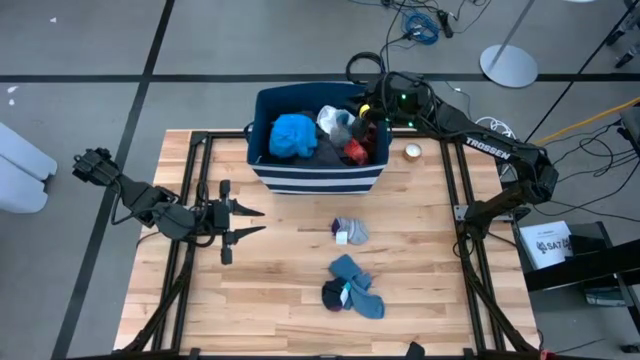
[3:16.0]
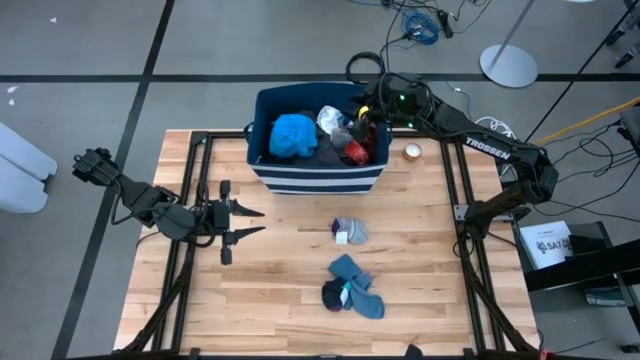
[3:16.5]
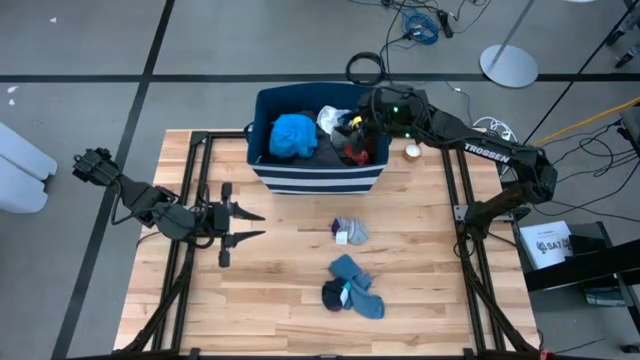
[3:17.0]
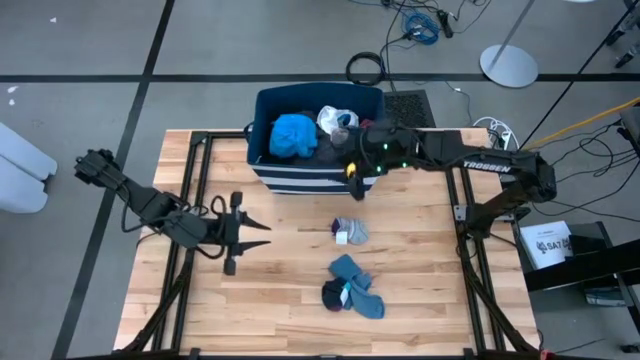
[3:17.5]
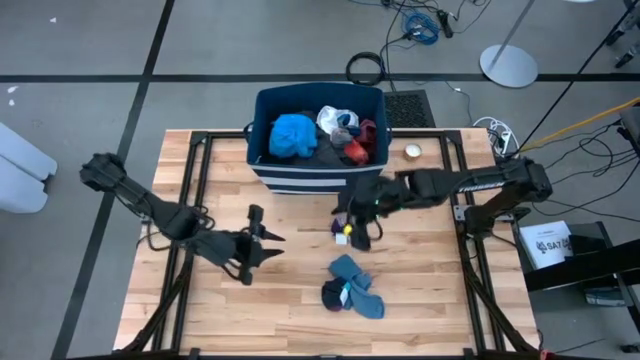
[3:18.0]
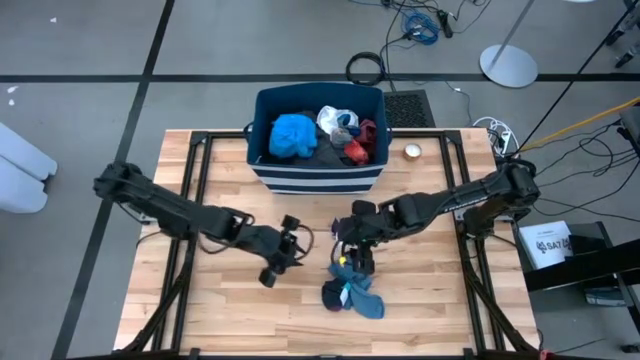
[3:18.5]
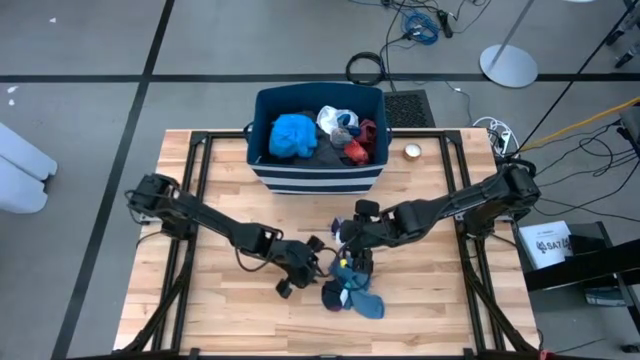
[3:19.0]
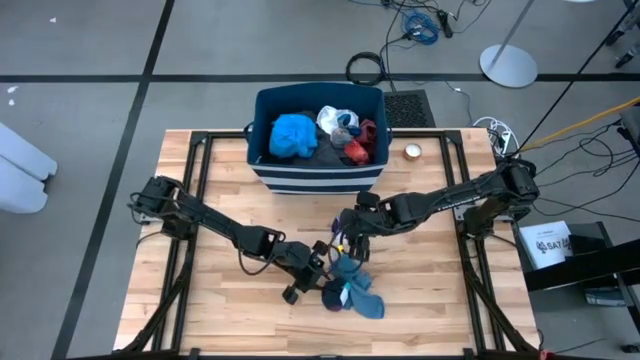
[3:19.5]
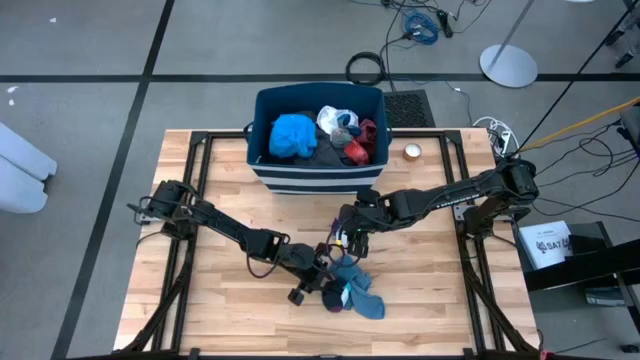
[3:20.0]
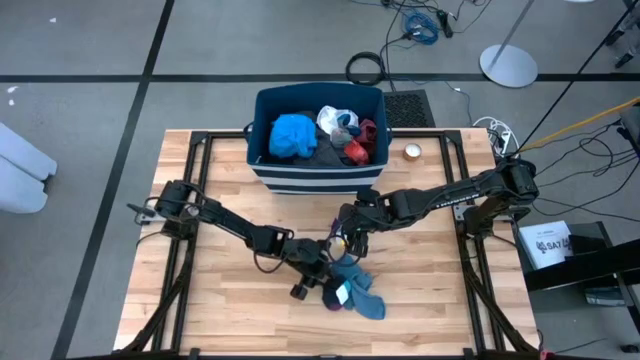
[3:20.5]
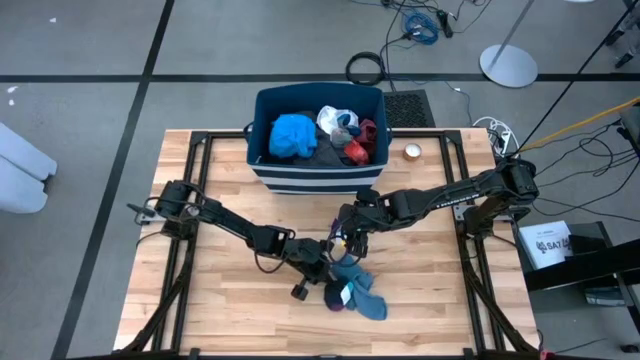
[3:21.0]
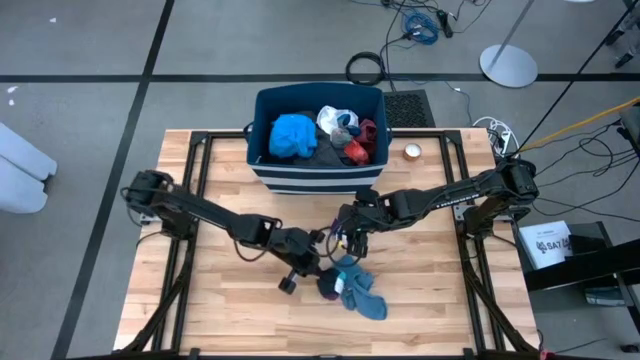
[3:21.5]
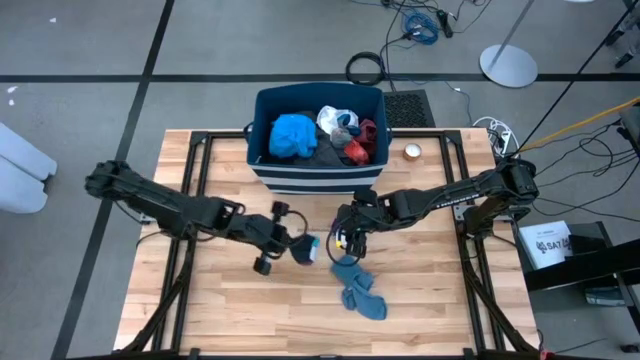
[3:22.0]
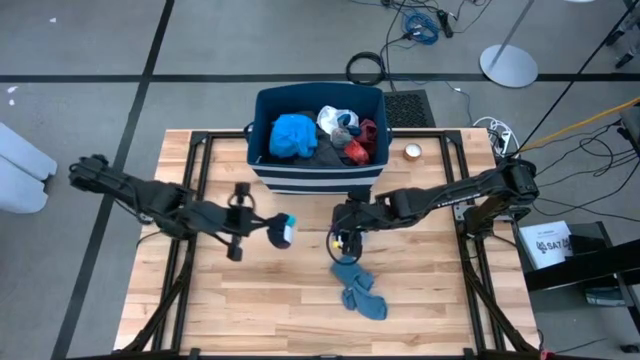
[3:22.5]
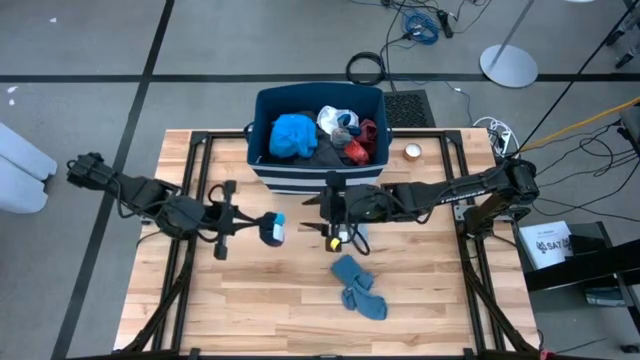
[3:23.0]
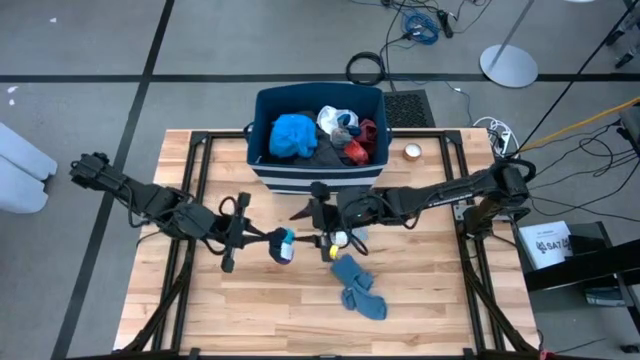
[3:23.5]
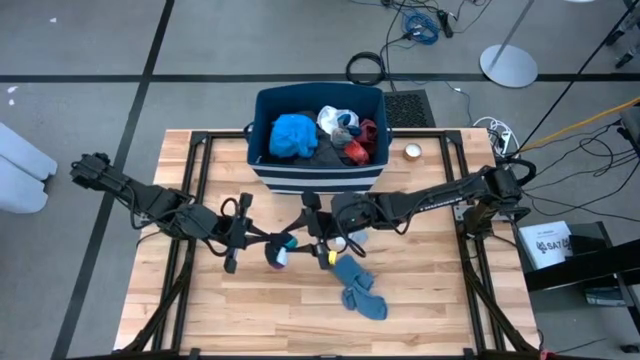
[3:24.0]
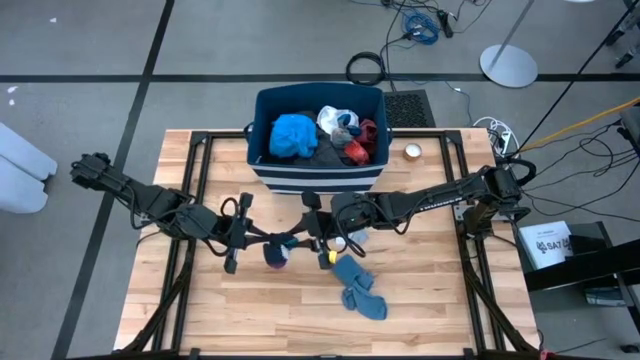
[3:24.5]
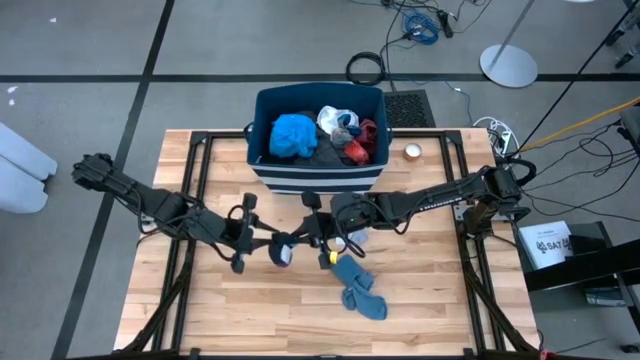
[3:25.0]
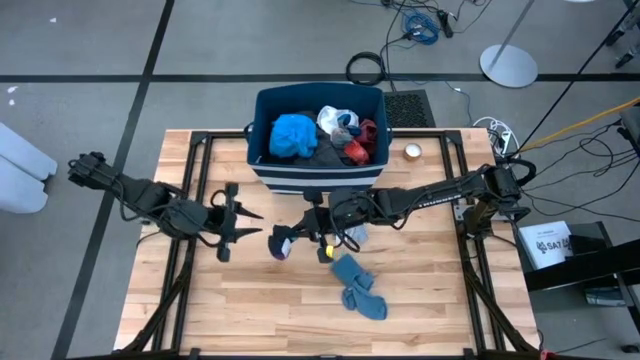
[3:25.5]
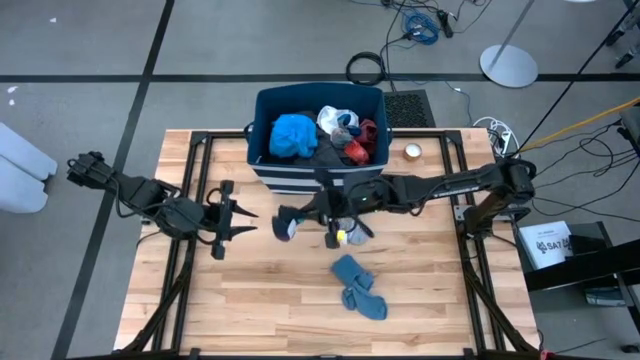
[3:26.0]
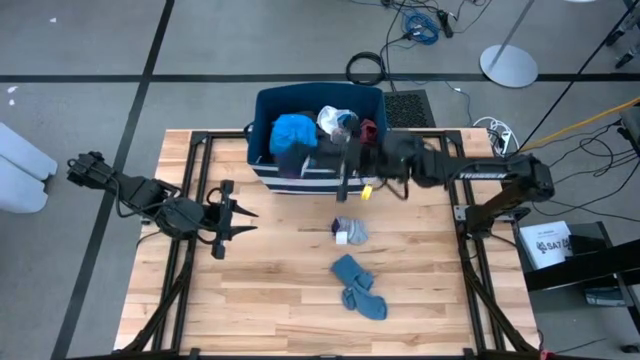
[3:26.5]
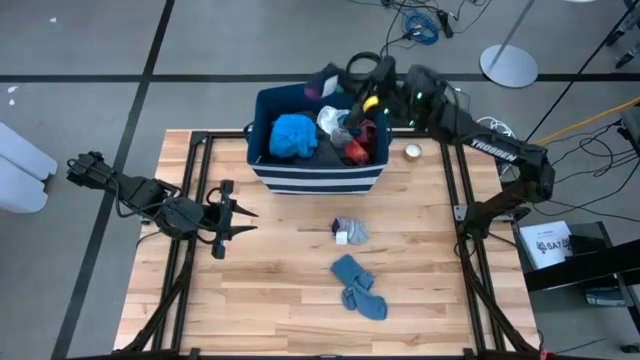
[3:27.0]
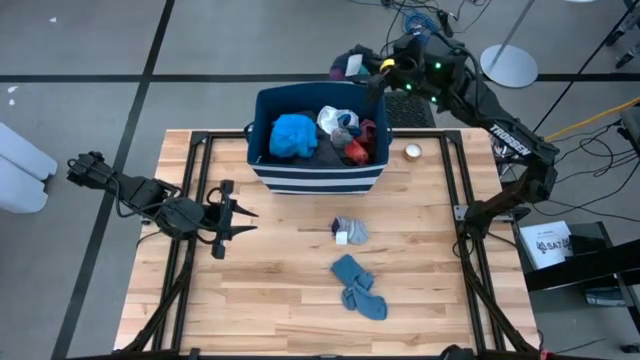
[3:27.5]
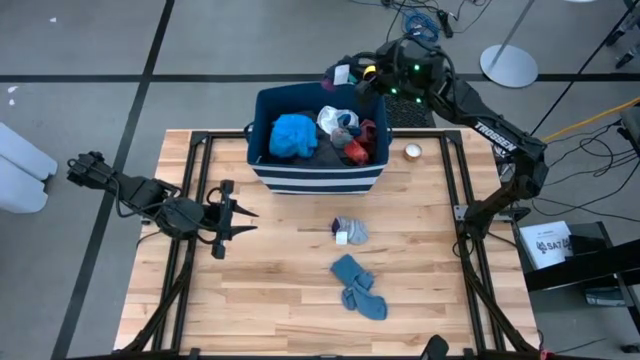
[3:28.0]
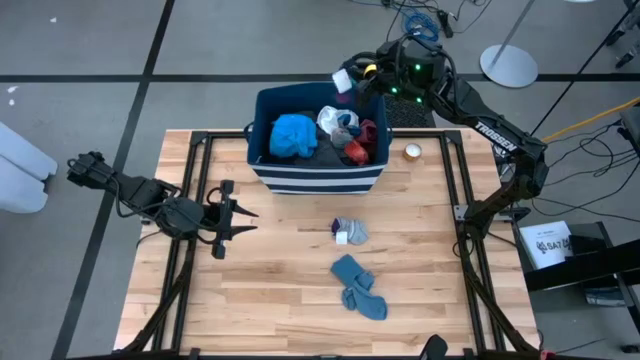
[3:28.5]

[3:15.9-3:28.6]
Task: Sort clothes
Put the black sock into the blue laundry bin

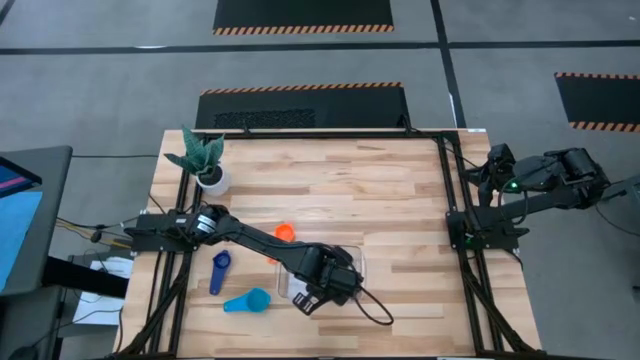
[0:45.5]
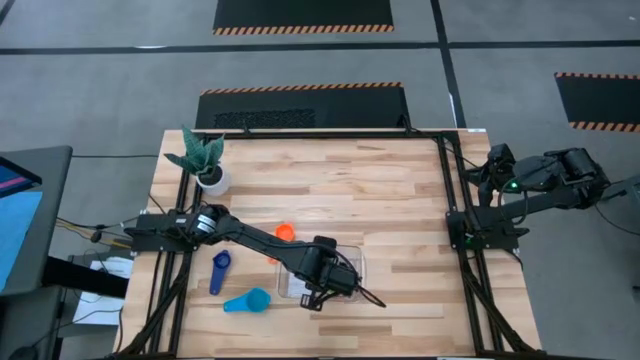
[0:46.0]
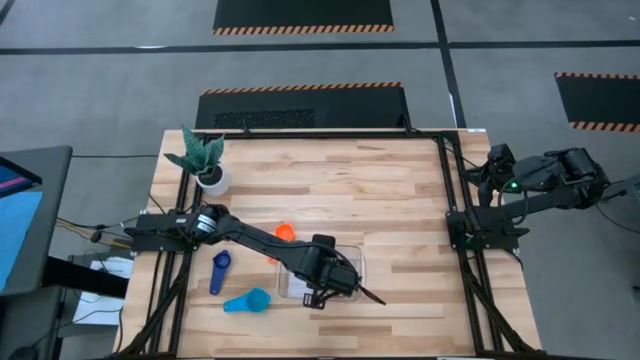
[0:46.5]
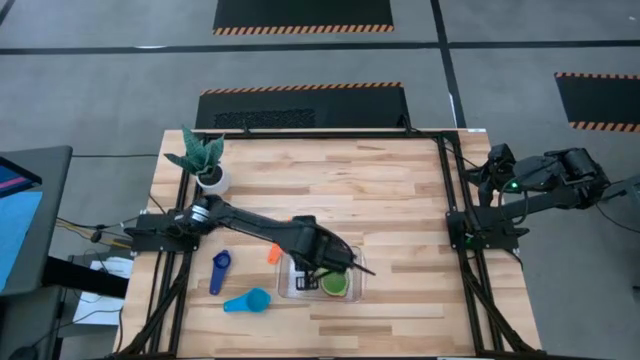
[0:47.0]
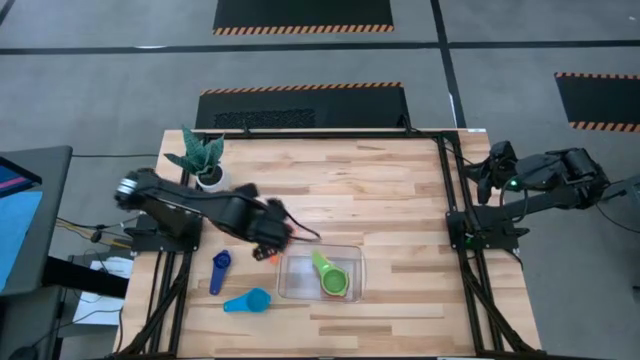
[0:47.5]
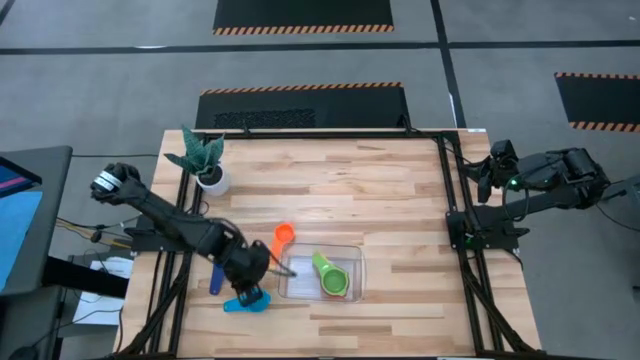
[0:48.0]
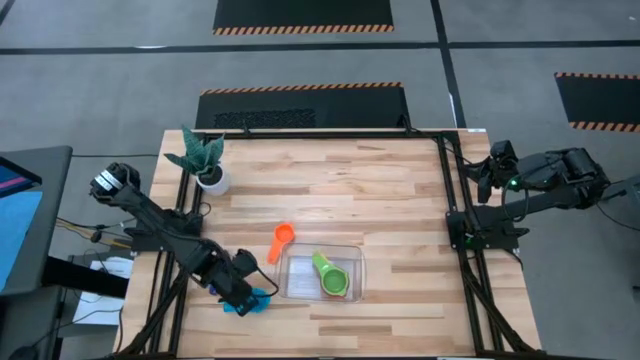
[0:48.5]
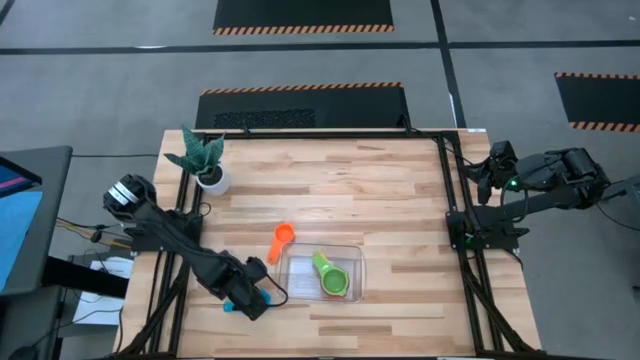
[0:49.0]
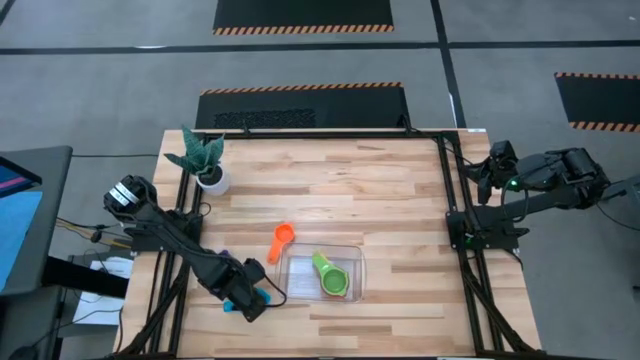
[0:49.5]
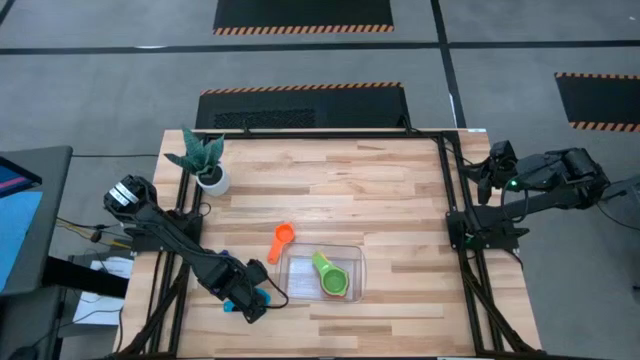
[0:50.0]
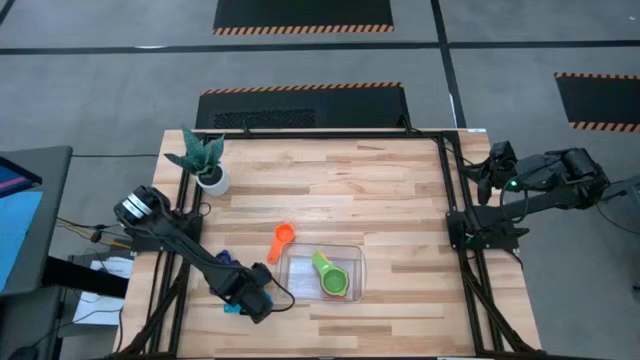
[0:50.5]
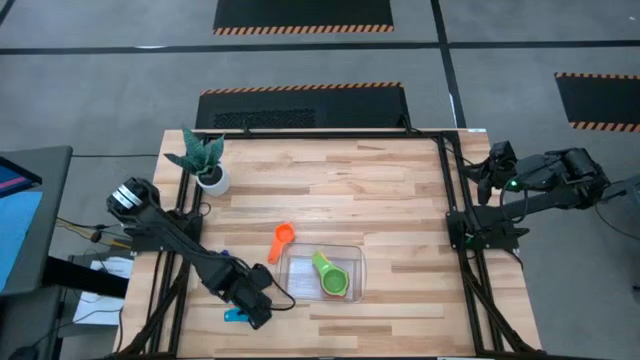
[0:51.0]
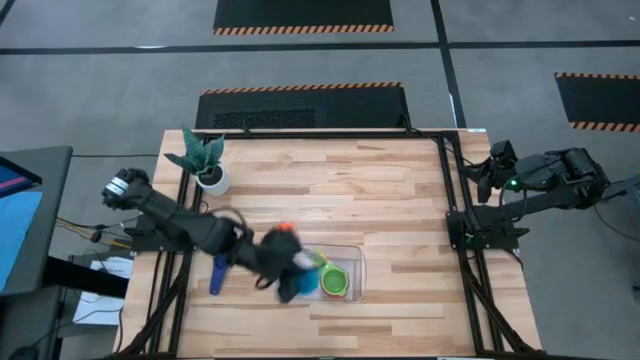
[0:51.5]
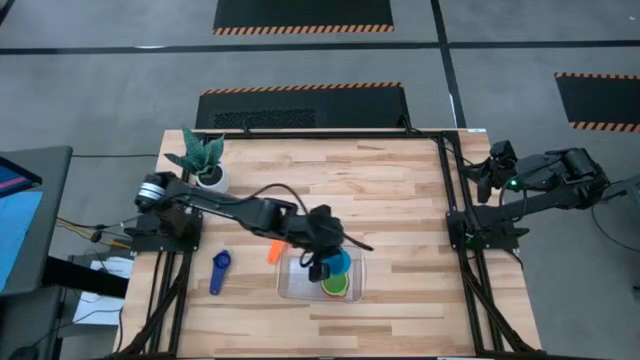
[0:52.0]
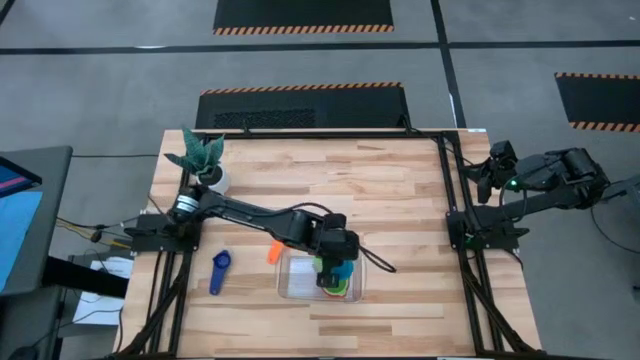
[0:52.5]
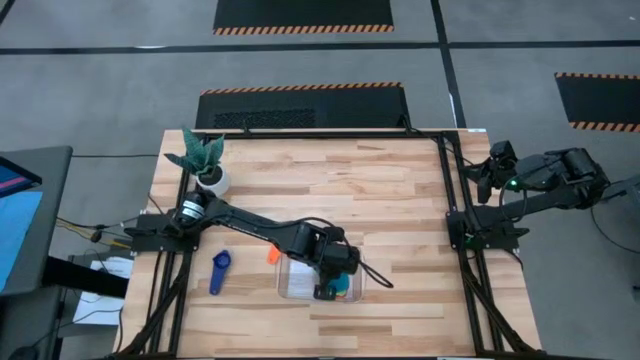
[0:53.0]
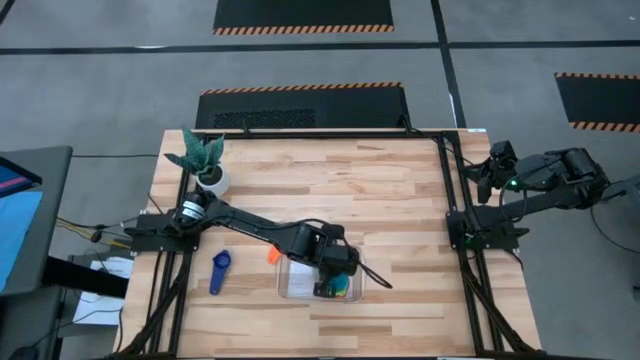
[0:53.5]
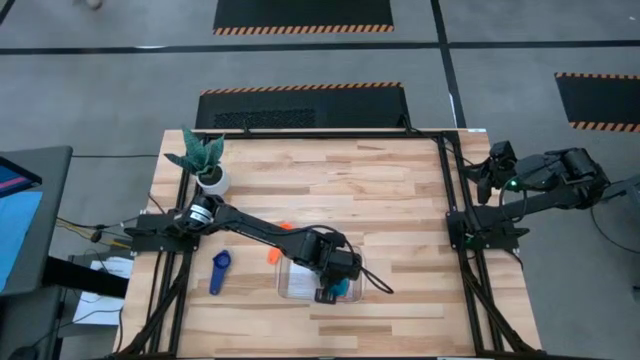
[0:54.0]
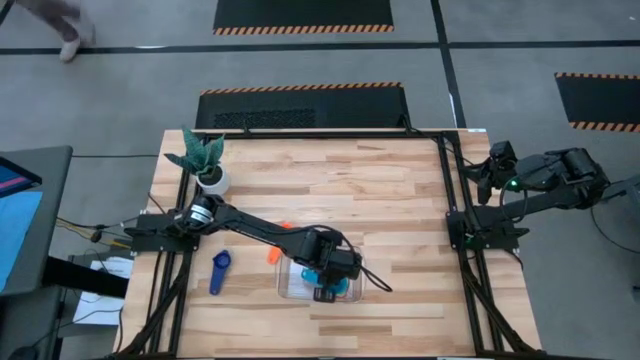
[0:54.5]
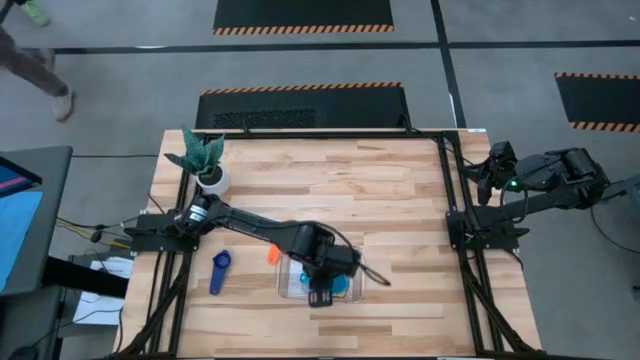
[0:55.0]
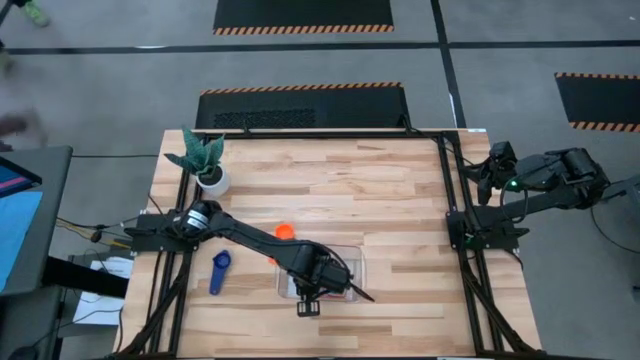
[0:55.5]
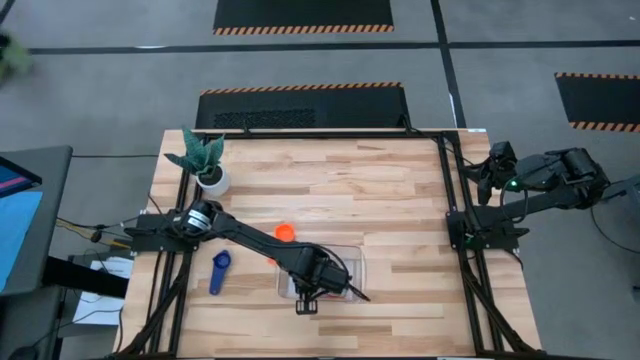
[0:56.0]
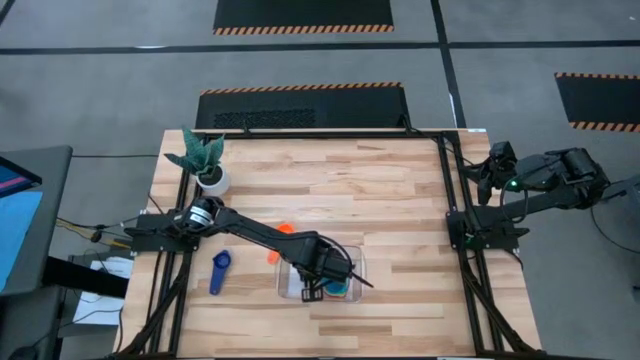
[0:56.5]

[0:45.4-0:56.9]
Task: Nest measuring cups in basket
Stack the light blue measuring cup on top of the green measuring cup in the transparent bin
